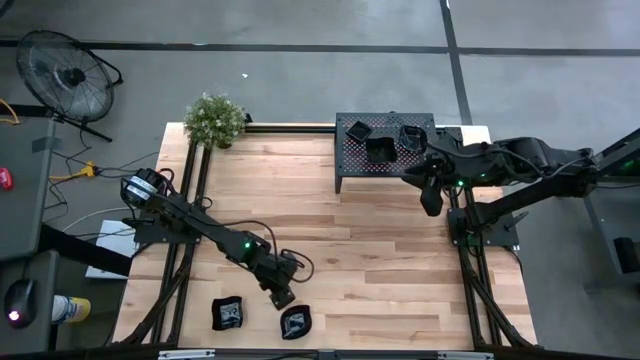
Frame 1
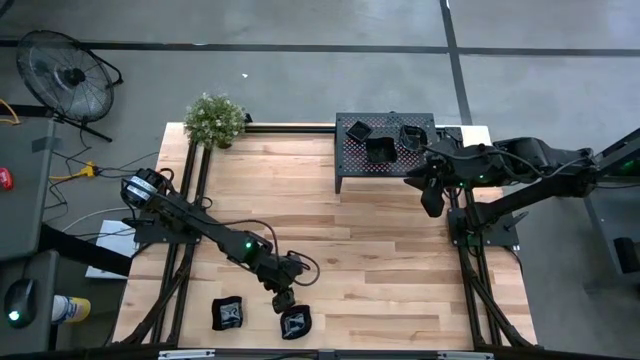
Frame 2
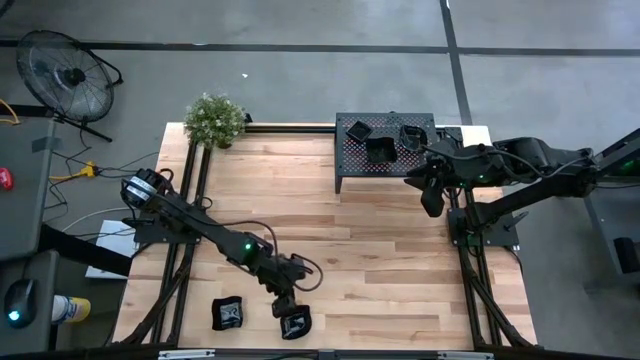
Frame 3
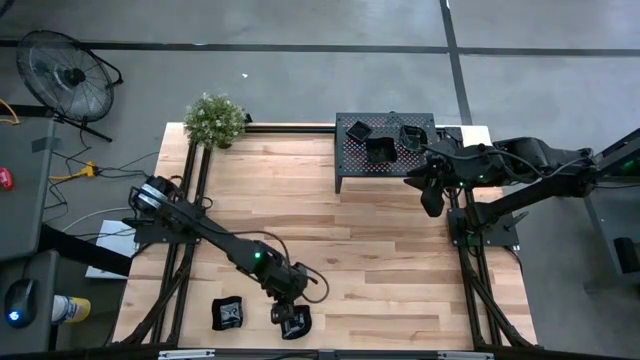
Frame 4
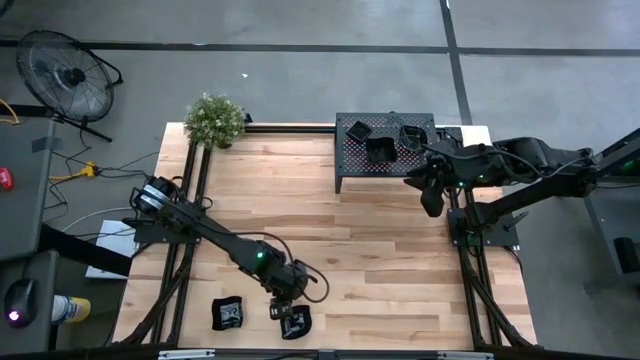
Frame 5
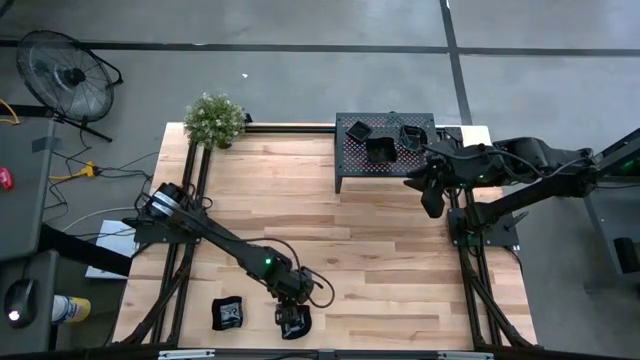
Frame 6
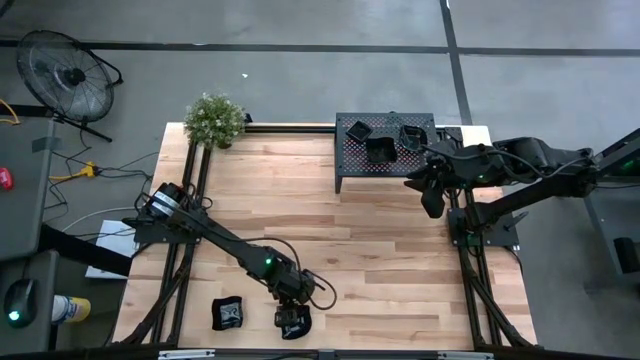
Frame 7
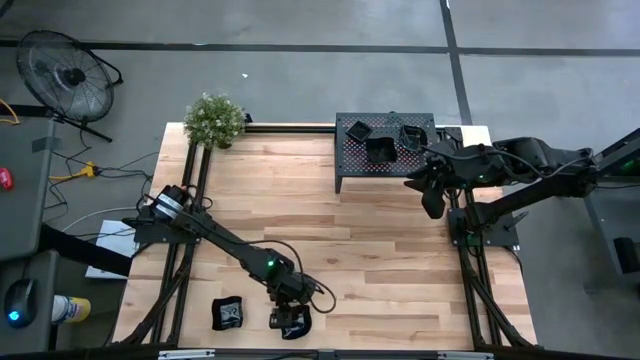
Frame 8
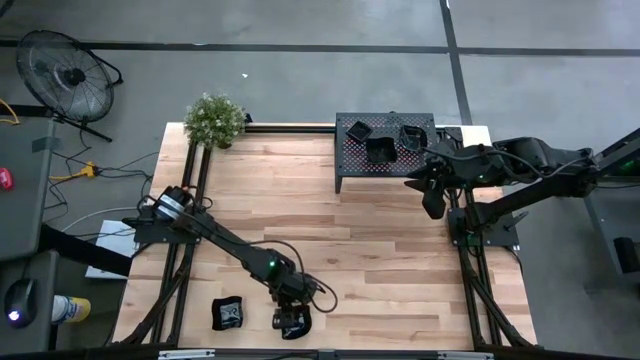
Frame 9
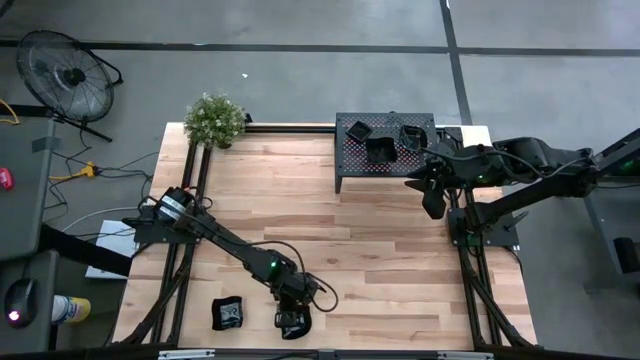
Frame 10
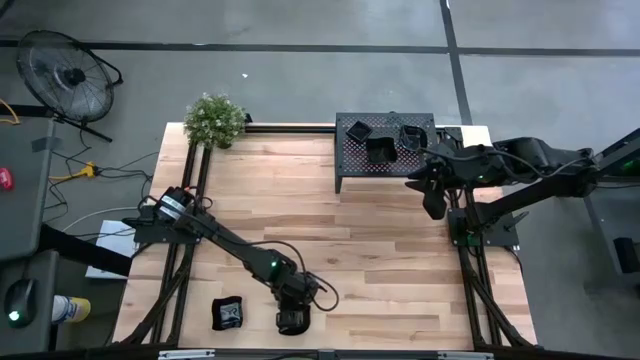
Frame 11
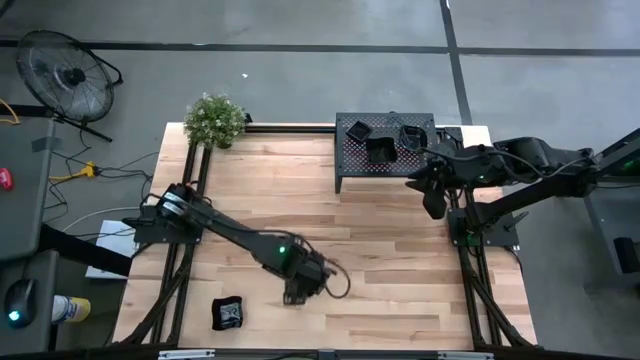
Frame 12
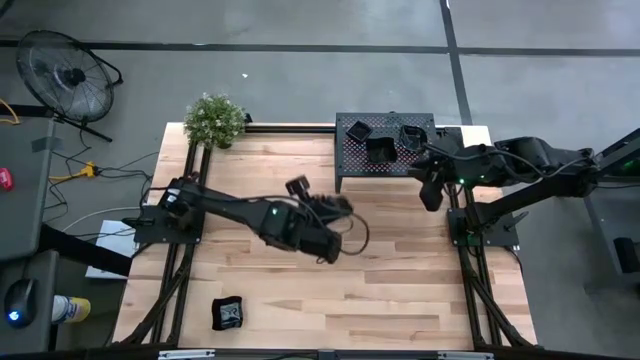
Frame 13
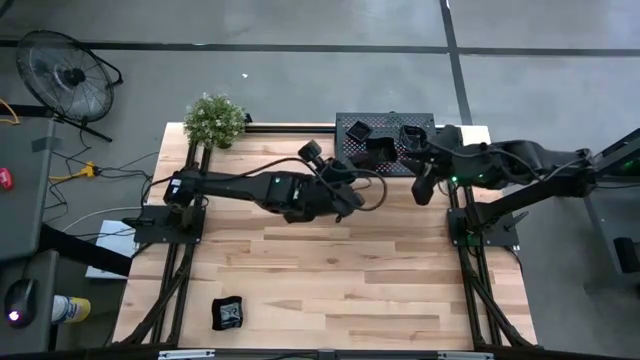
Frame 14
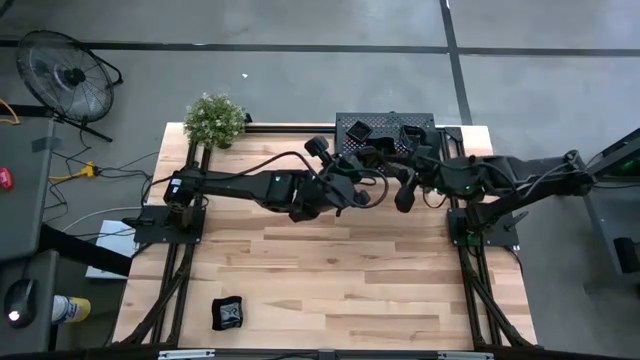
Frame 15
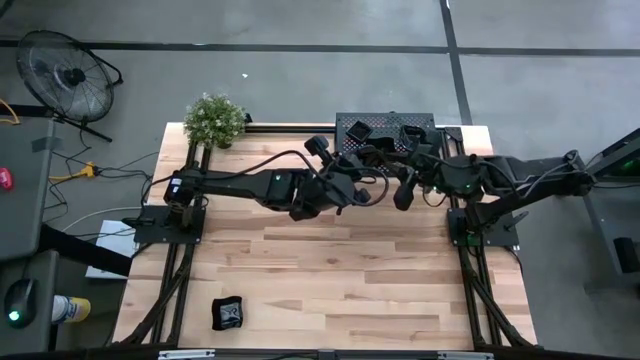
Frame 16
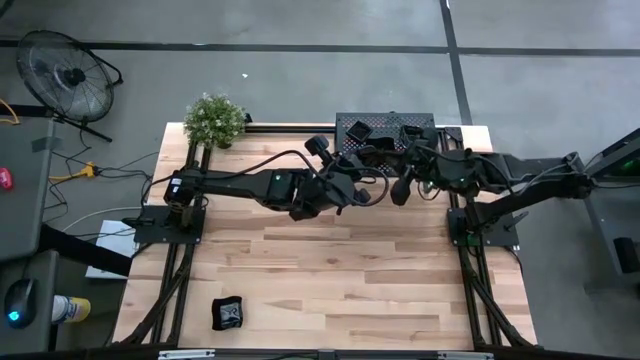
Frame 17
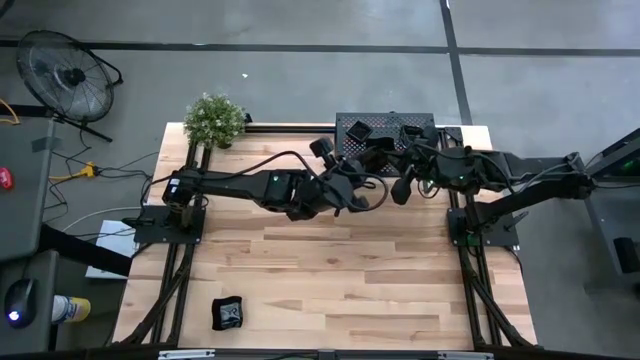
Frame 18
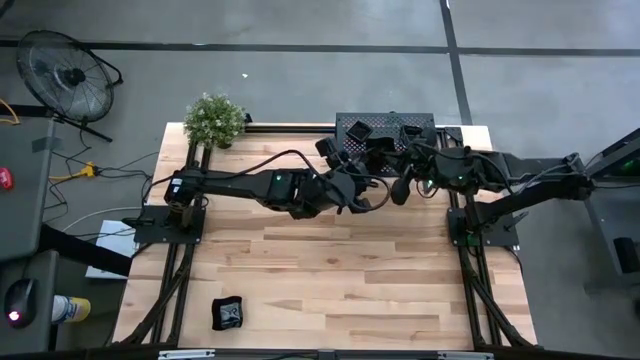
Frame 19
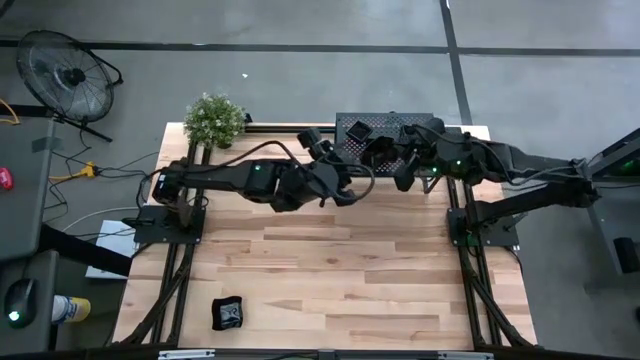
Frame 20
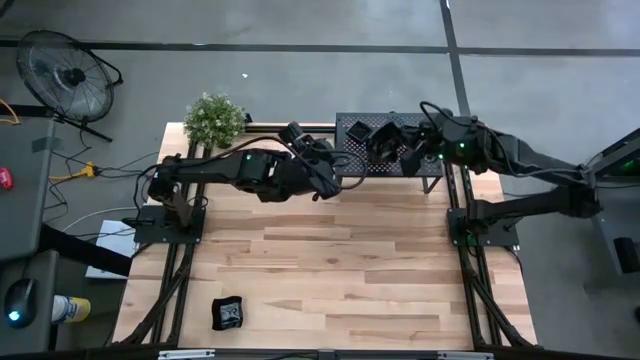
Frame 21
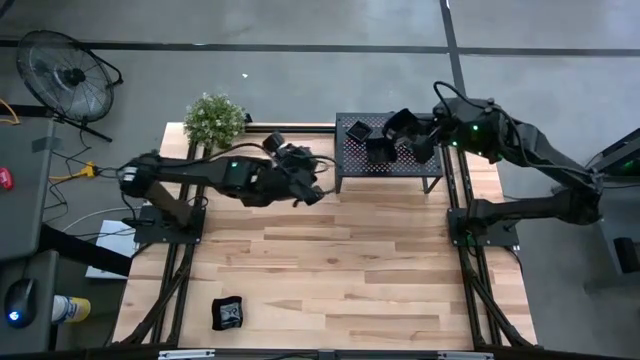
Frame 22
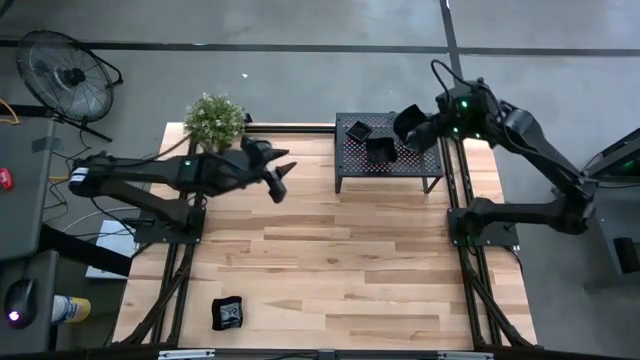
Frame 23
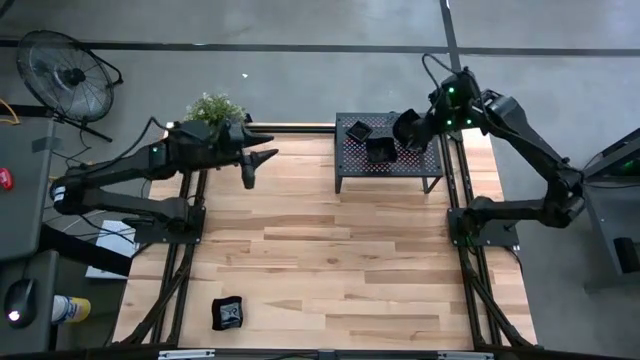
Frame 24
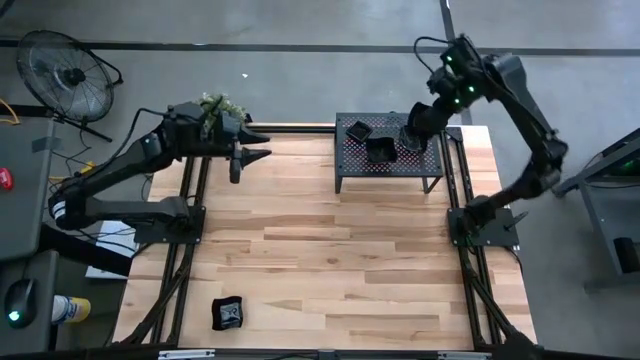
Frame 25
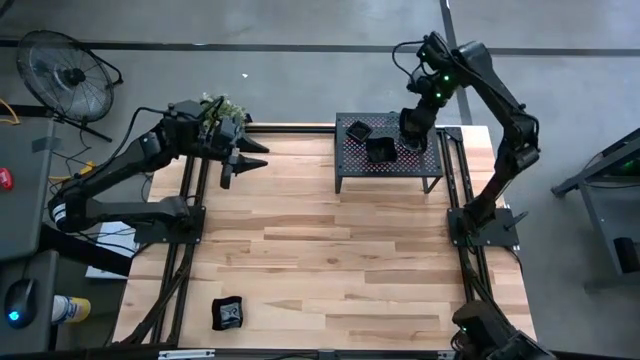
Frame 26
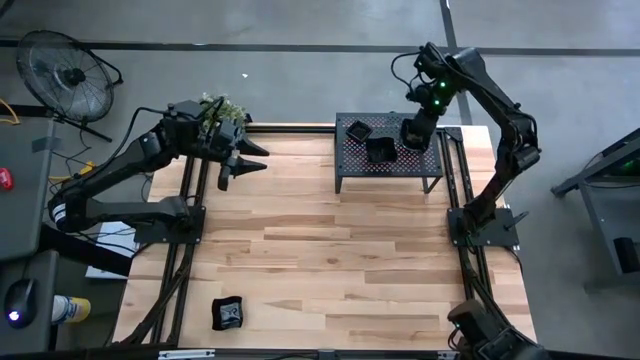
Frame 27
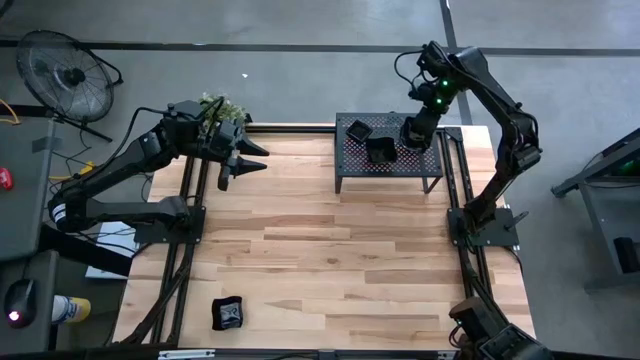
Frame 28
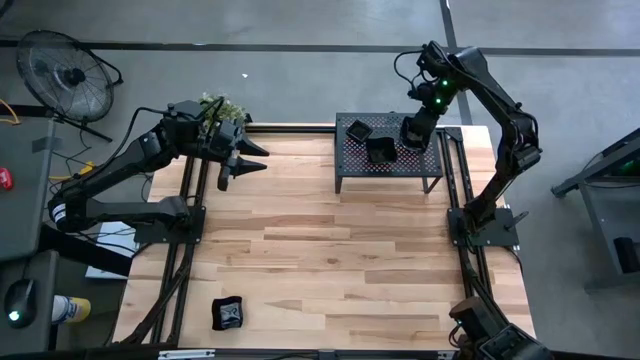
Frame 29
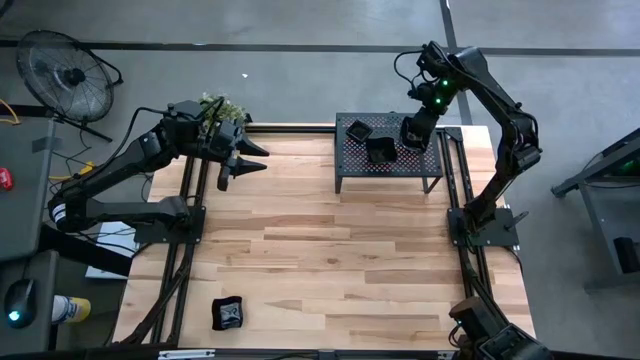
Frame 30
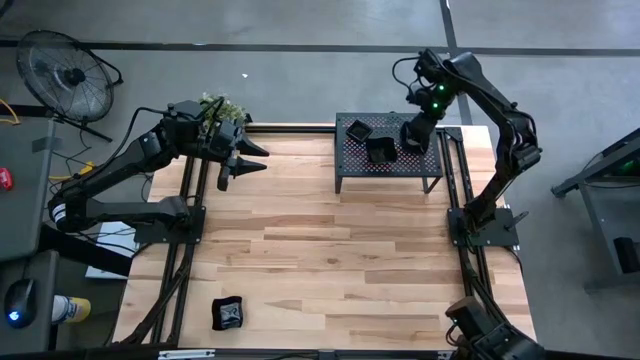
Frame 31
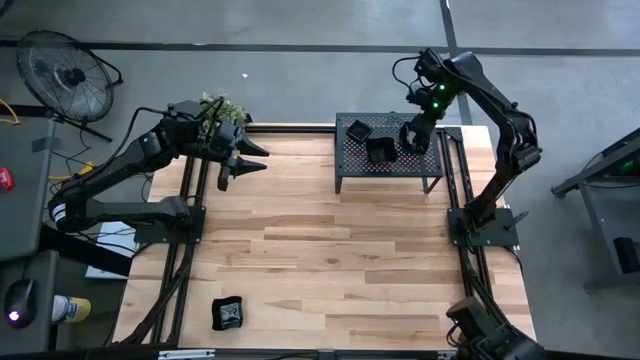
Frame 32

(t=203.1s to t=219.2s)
Task: Pick & Place Mini shaped plates
Stack the black leaf-shaped plate on top of the black leaf-shaped plates on the shelf
